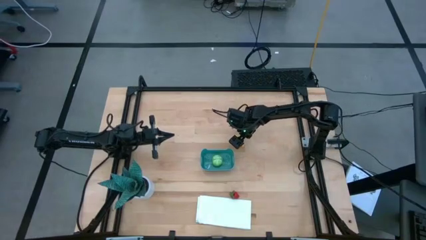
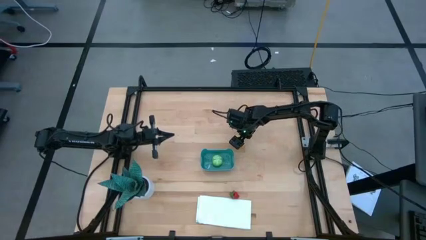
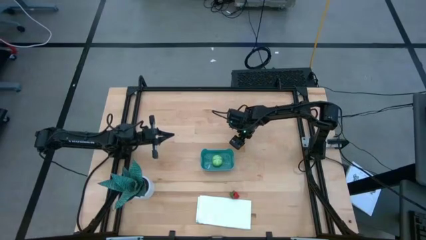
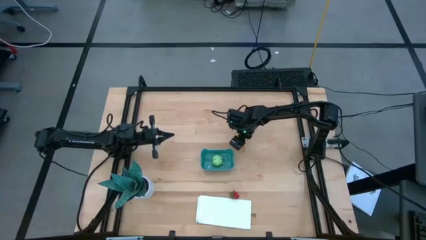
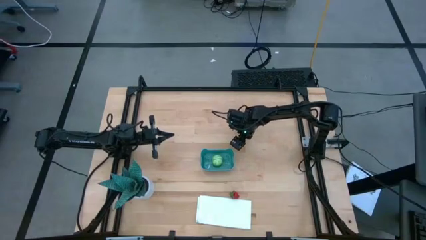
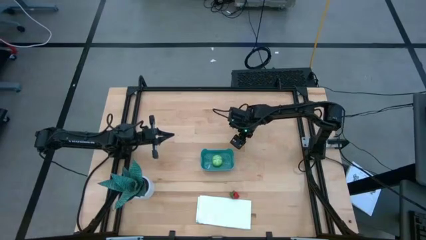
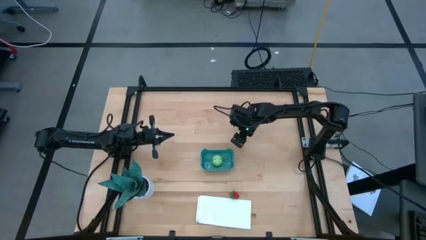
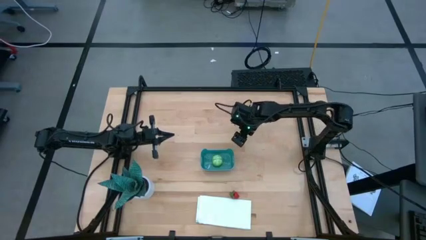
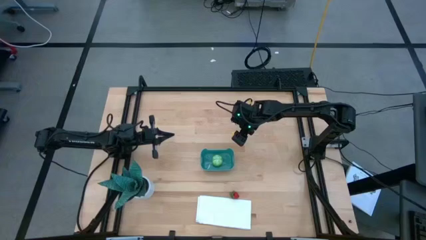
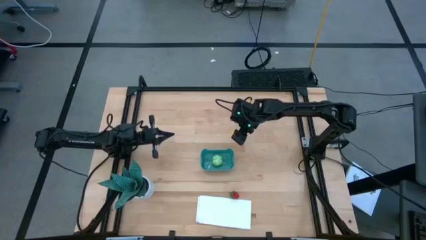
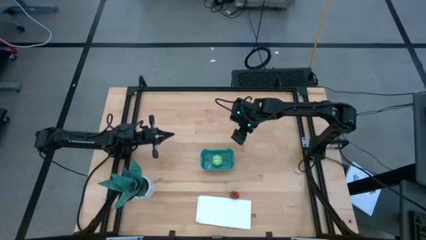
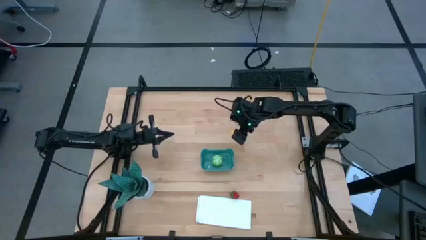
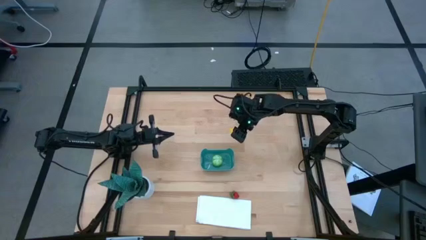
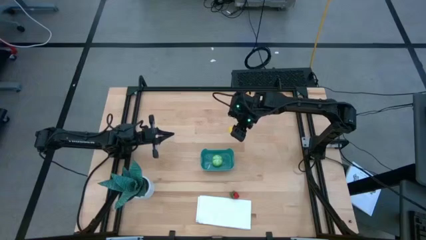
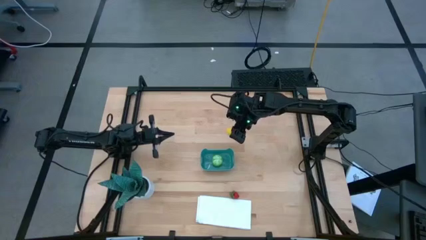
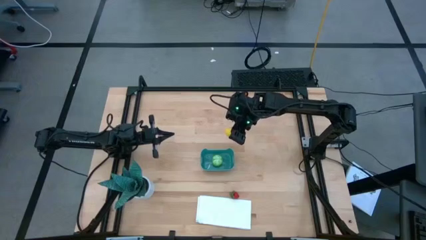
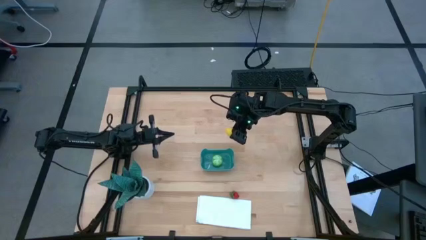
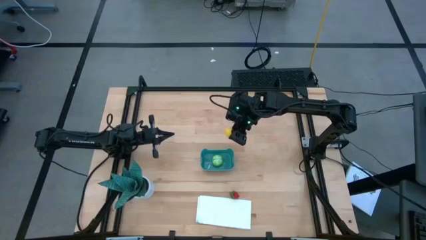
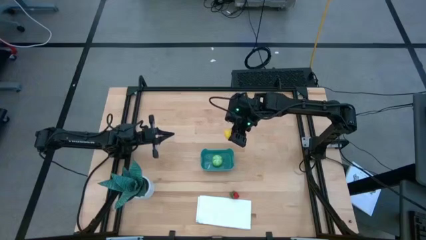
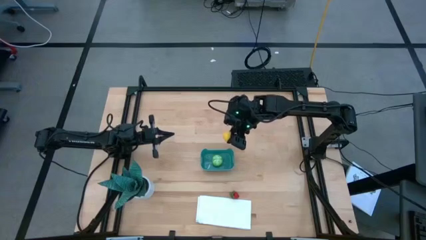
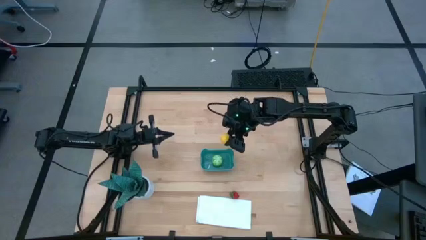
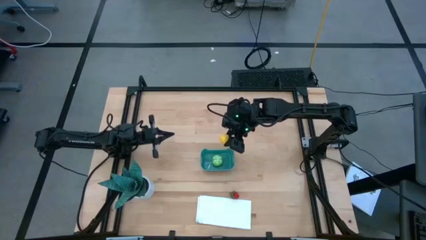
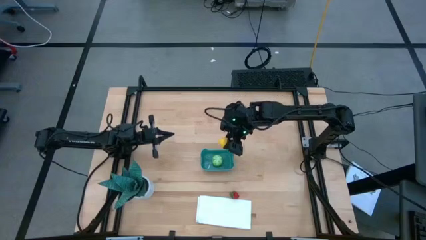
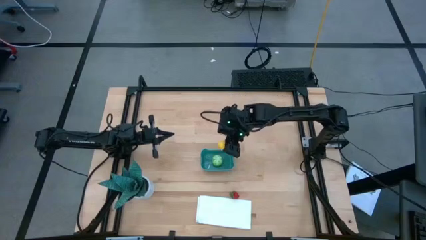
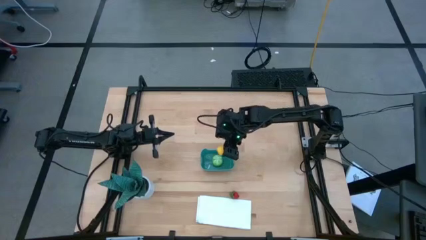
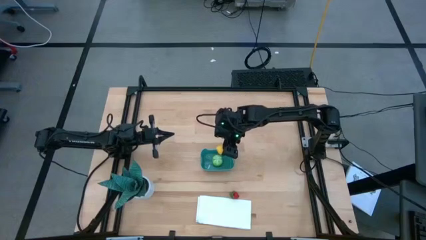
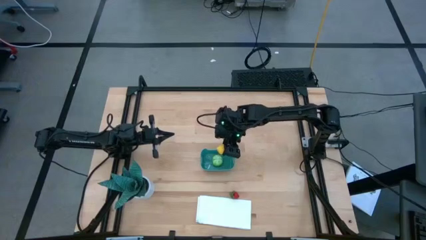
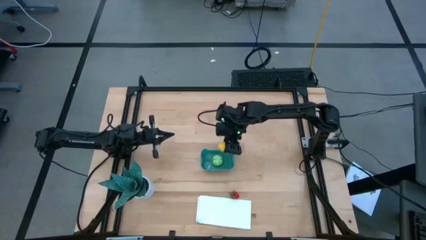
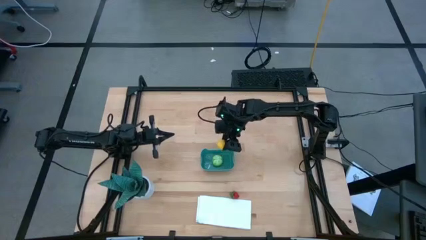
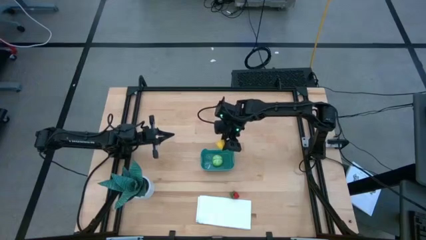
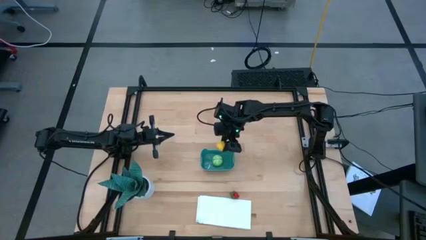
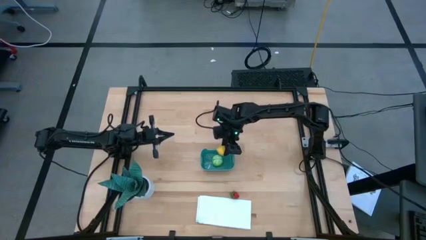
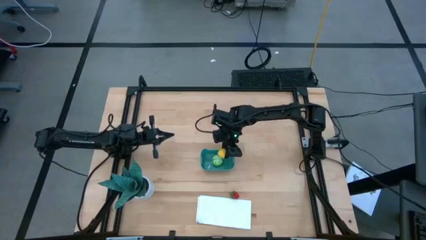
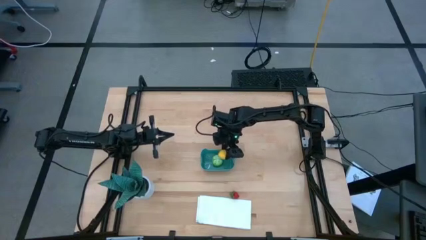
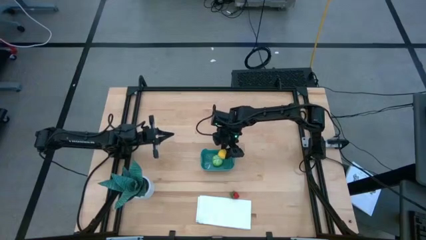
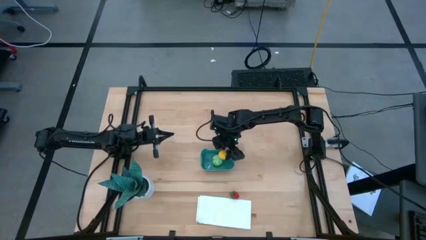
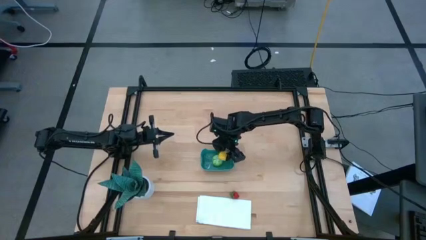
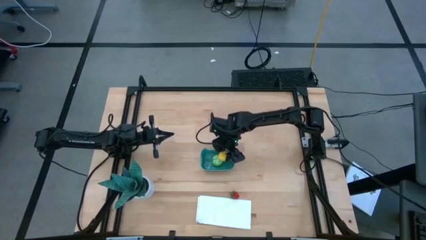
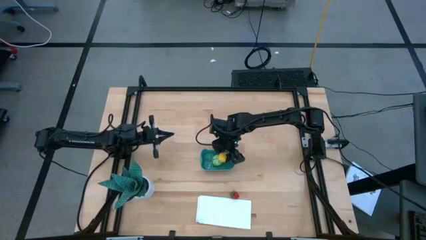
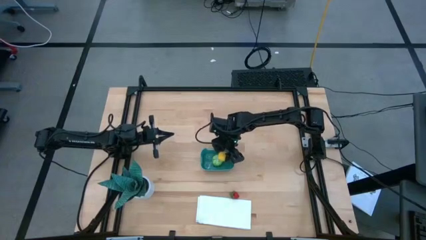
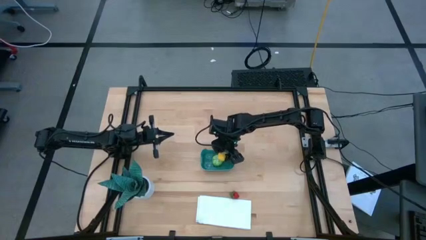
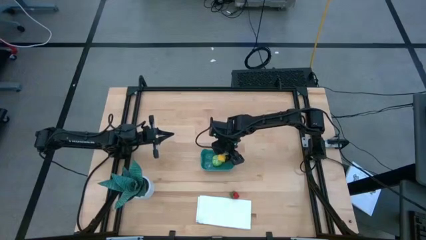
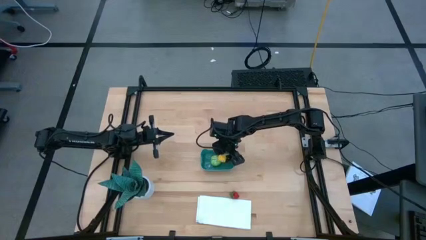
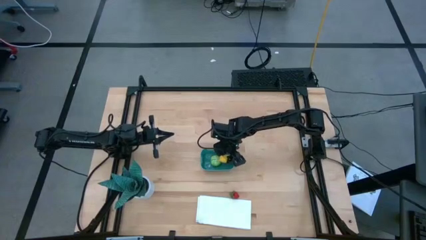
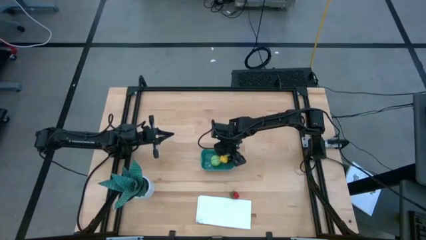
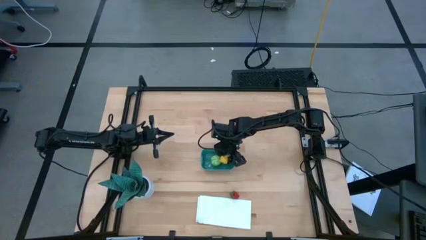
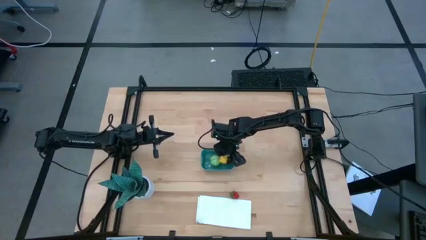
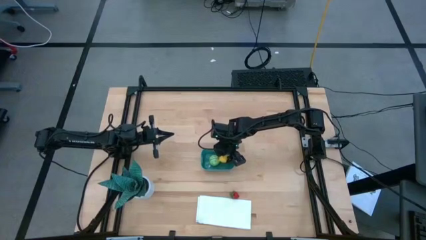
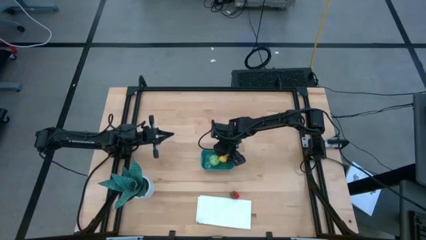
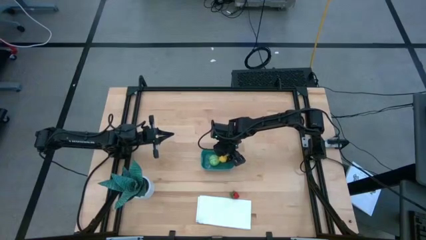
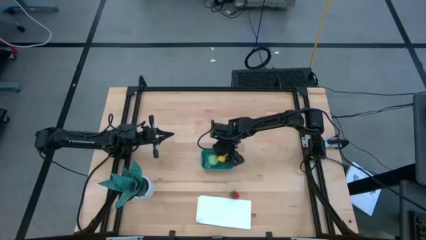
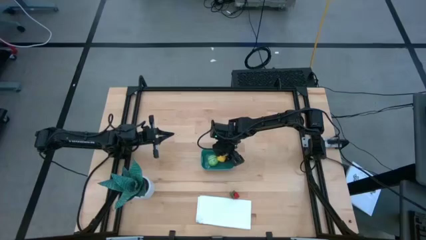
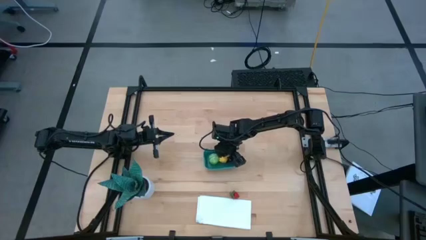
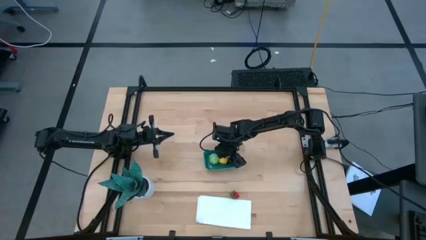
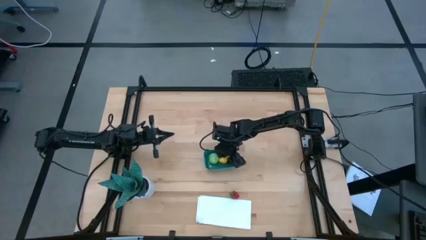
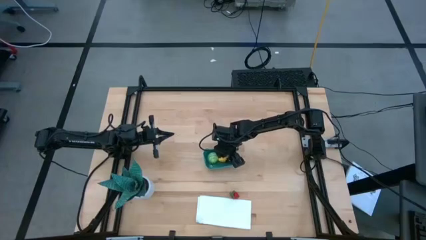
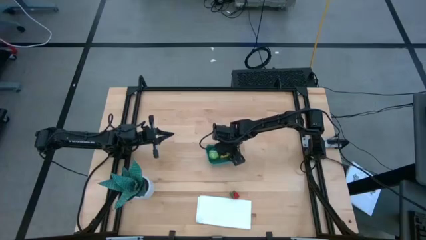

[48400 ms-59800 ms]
Task: Pick and placing Produce into tupperware
Put the lemon into the green bin

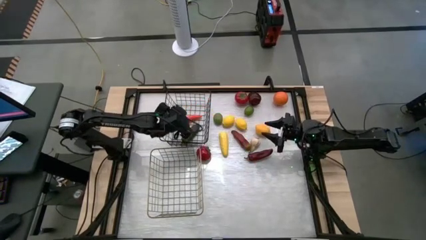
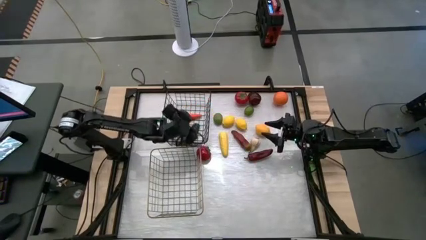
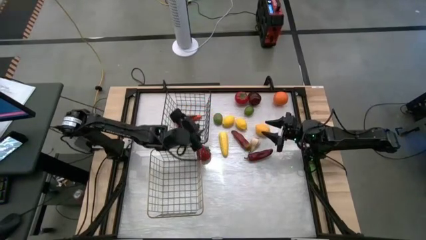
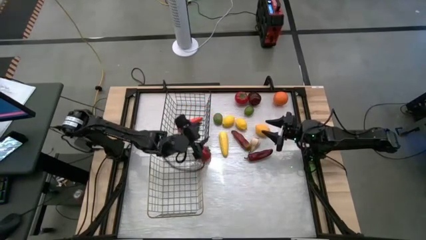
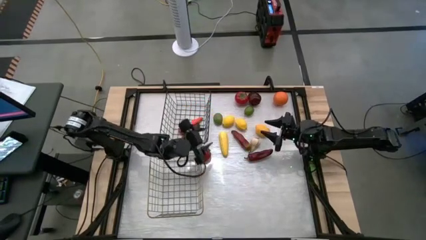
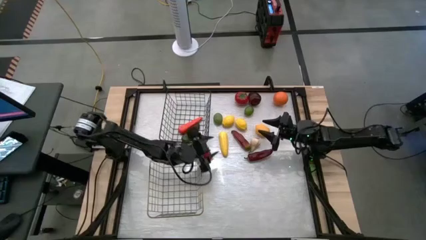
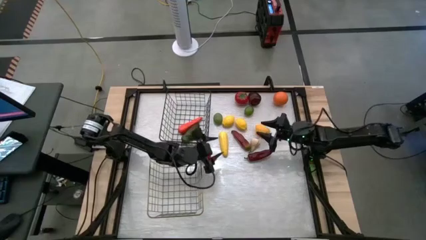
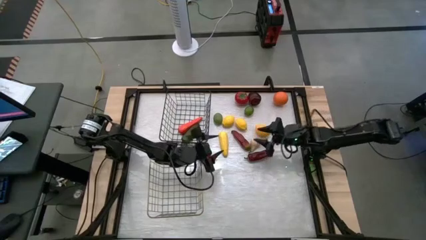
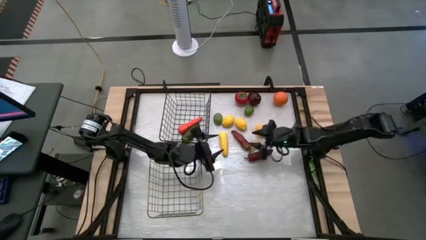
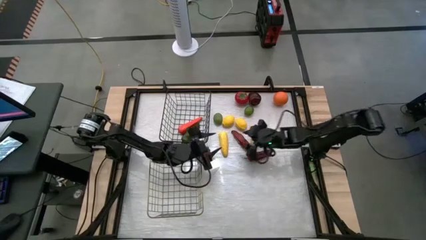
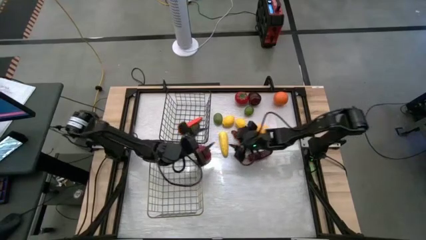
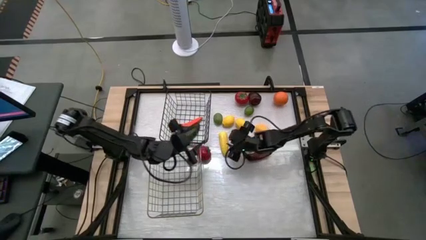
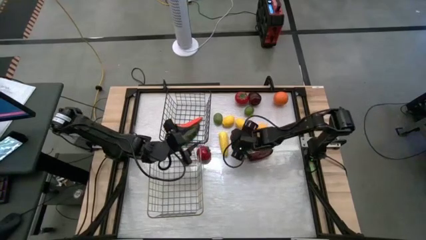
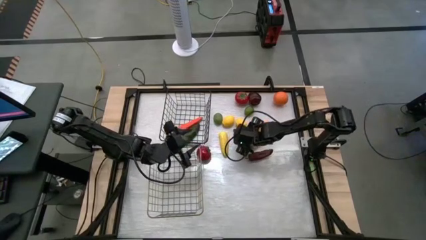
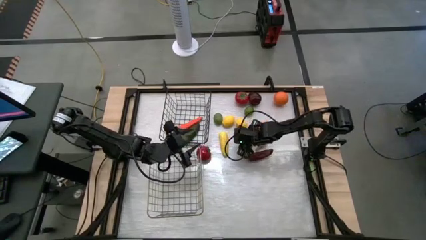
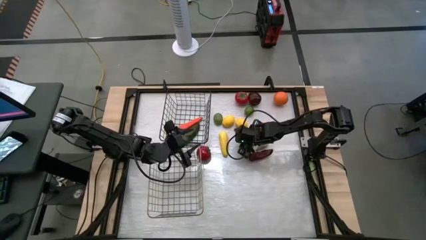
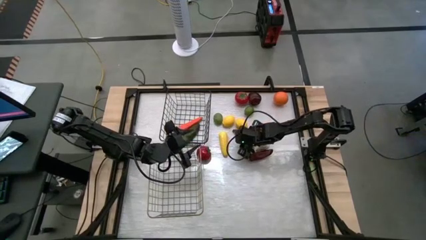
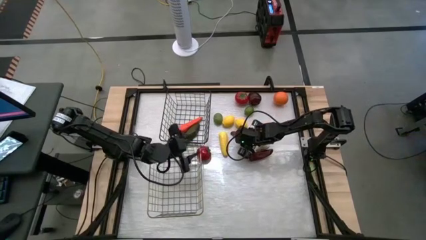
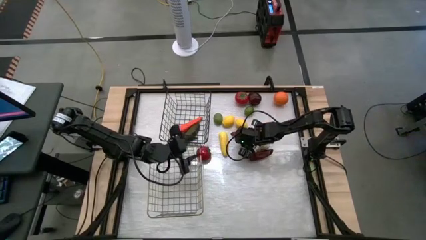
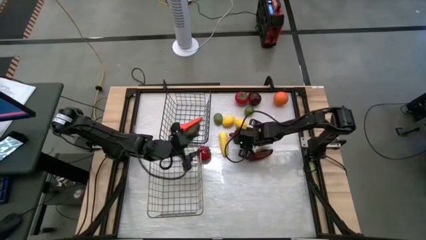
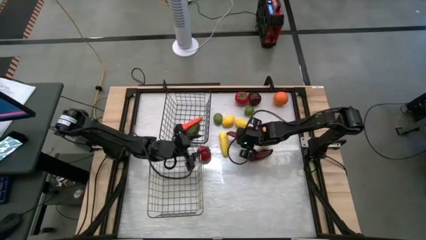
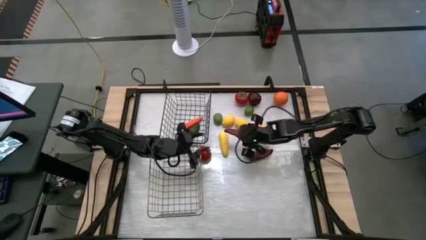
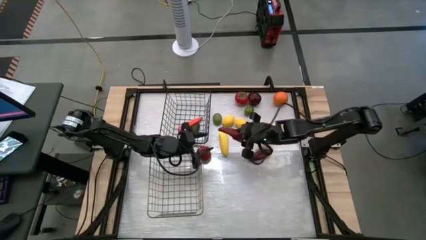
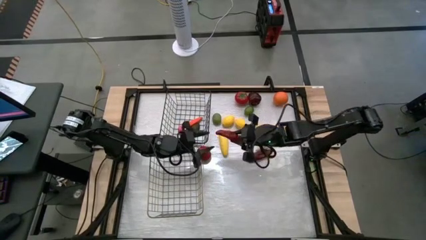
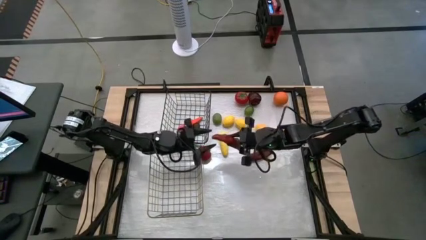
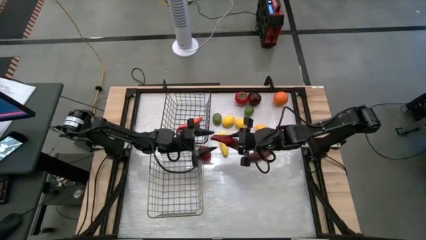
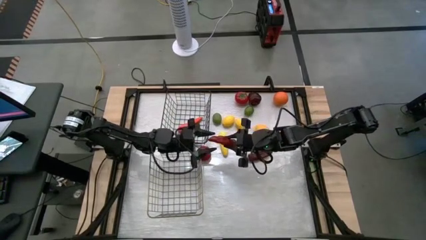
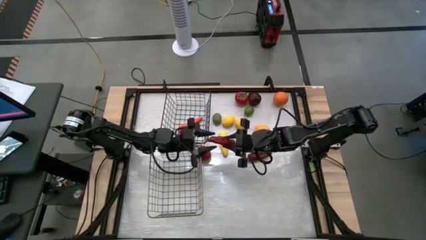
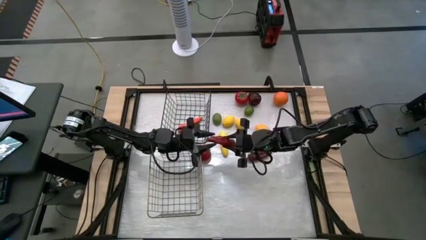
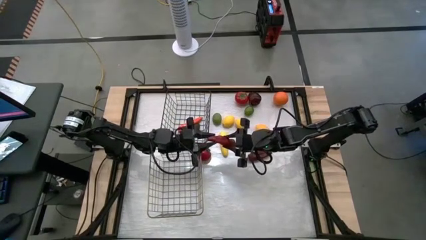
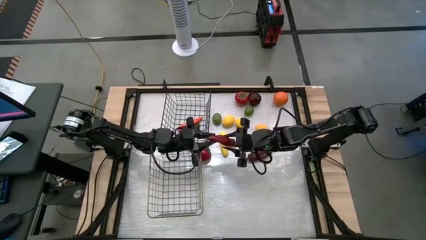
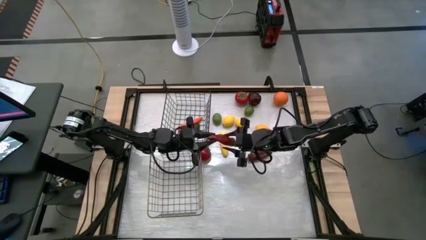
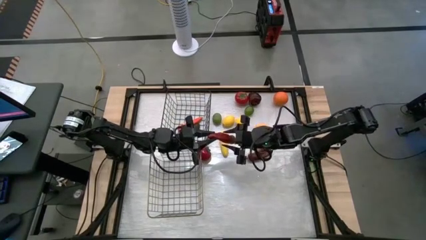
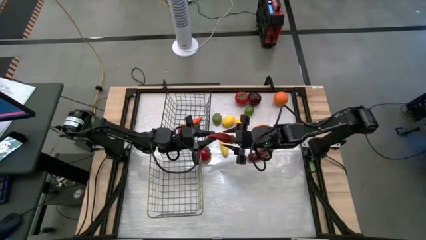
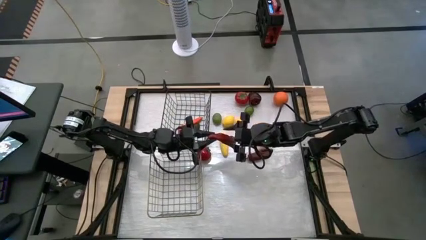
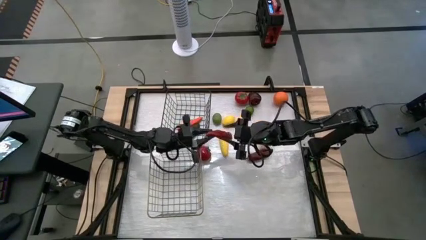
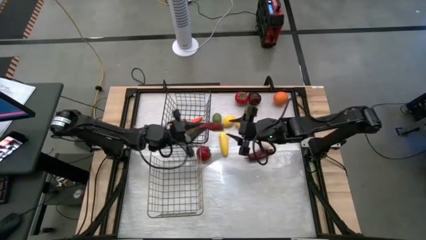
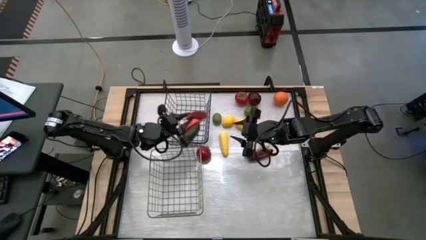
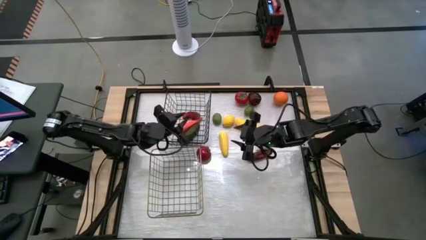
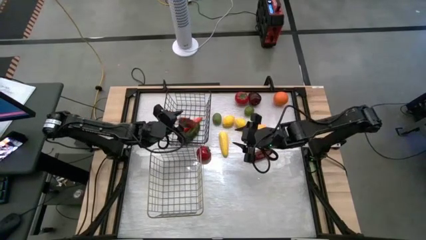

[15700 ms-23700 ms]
Task: Sort produce into baskets
Put the top red chili pepper into the black wire basket
